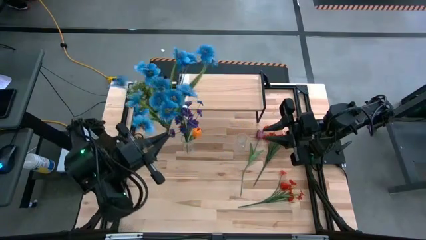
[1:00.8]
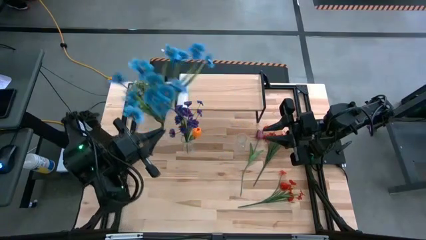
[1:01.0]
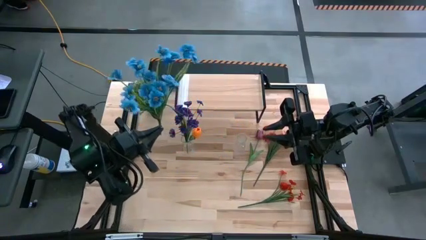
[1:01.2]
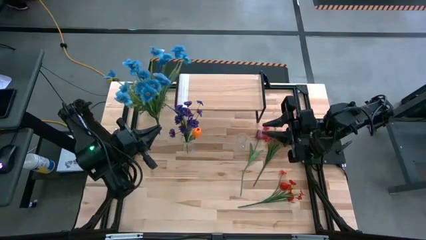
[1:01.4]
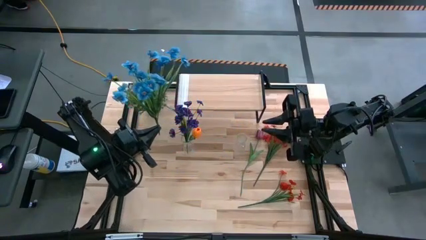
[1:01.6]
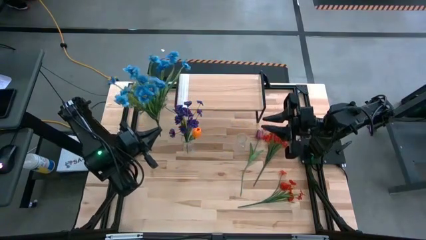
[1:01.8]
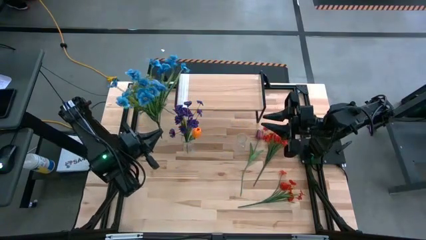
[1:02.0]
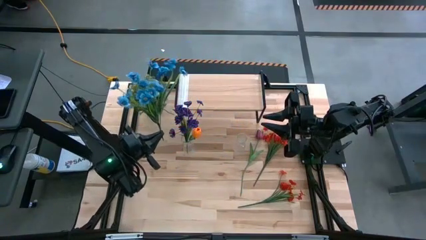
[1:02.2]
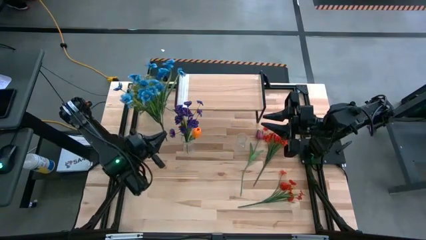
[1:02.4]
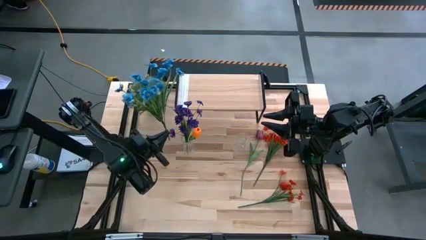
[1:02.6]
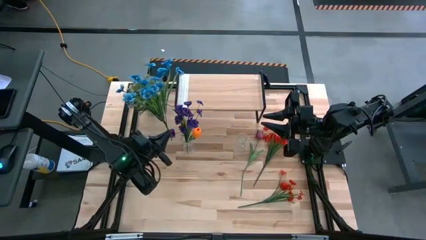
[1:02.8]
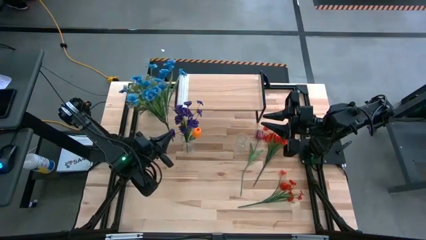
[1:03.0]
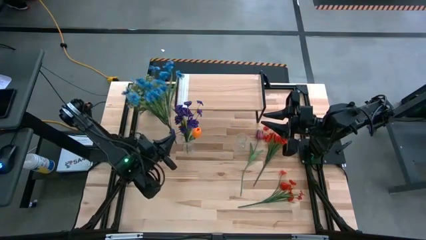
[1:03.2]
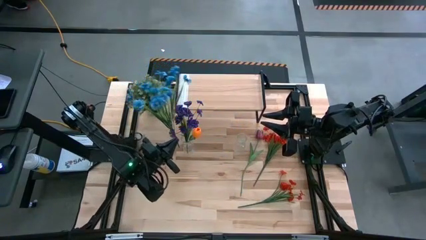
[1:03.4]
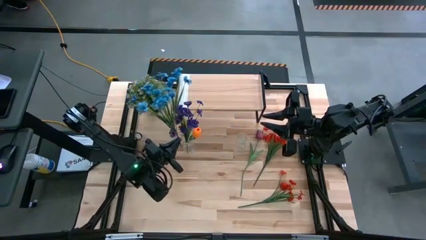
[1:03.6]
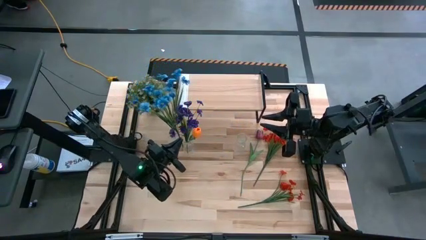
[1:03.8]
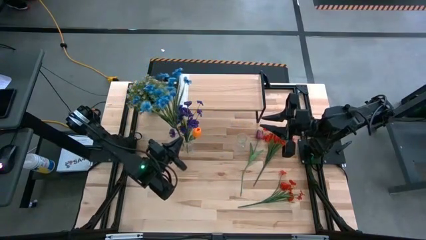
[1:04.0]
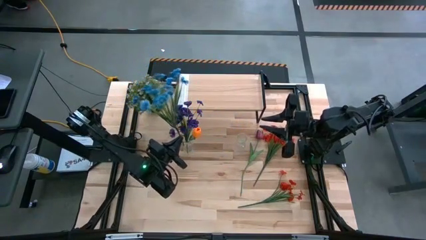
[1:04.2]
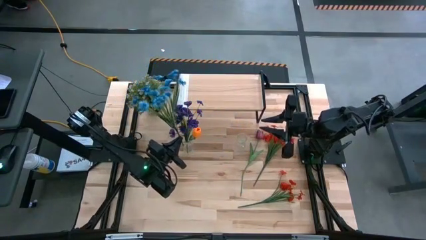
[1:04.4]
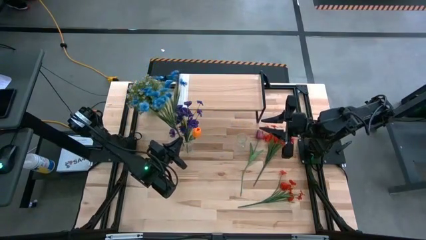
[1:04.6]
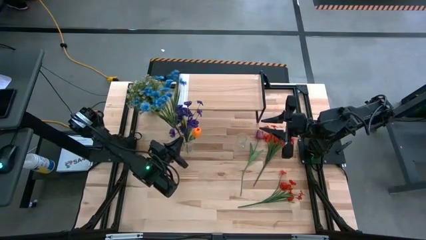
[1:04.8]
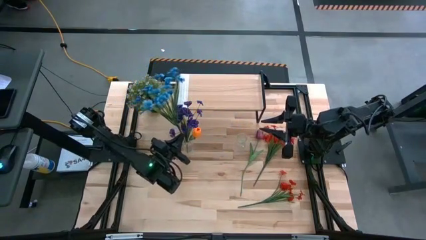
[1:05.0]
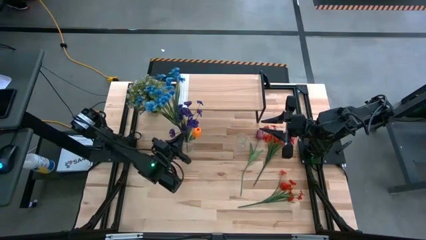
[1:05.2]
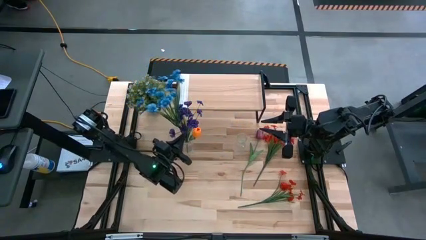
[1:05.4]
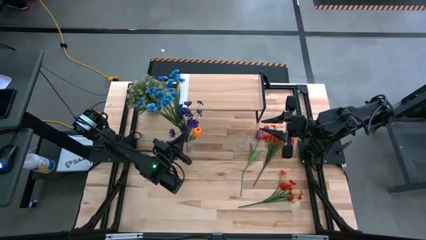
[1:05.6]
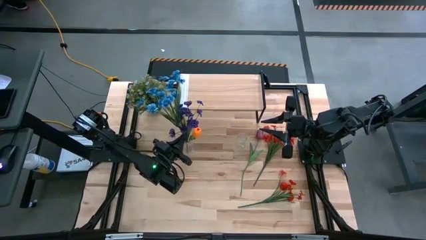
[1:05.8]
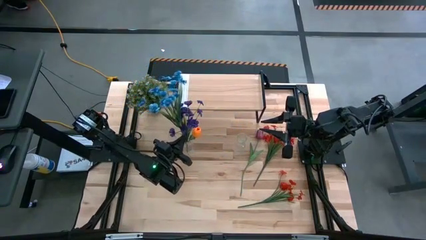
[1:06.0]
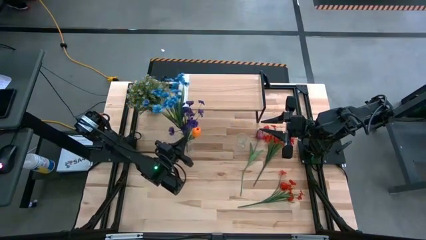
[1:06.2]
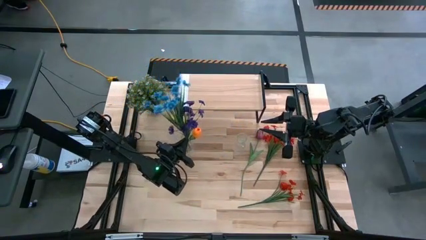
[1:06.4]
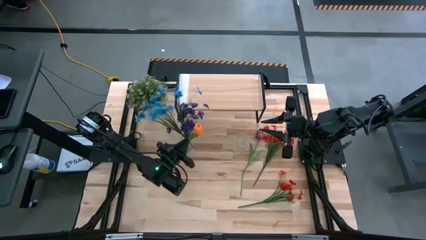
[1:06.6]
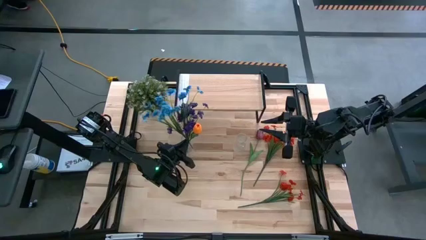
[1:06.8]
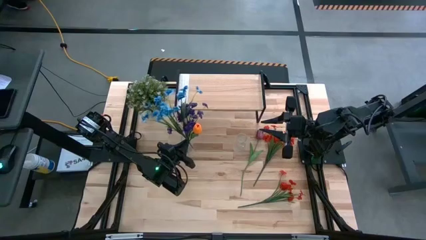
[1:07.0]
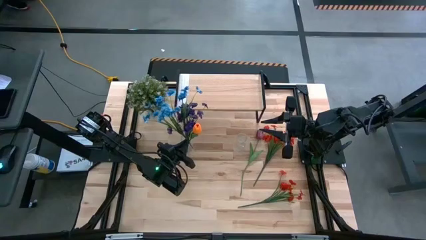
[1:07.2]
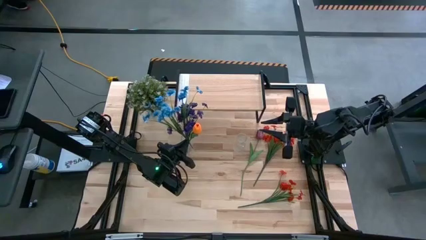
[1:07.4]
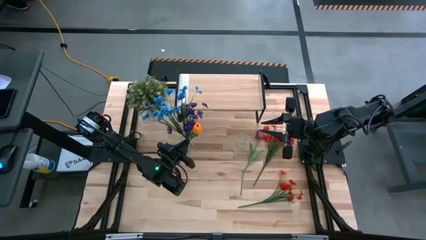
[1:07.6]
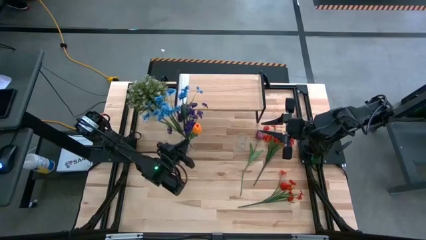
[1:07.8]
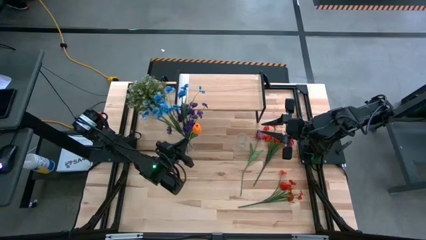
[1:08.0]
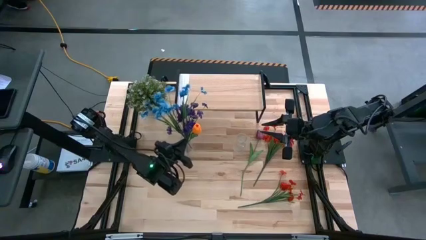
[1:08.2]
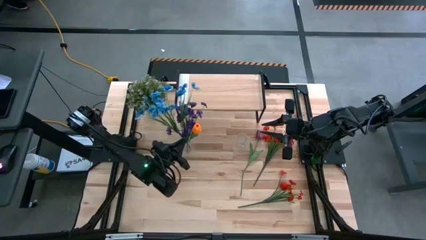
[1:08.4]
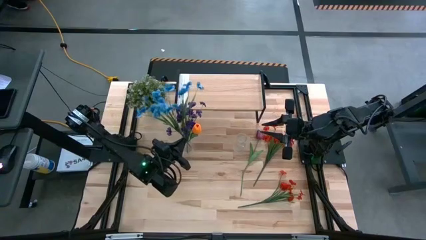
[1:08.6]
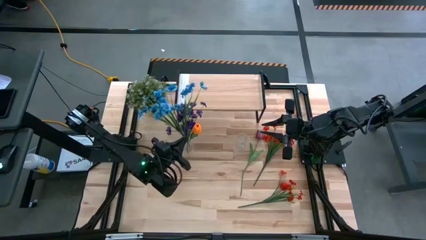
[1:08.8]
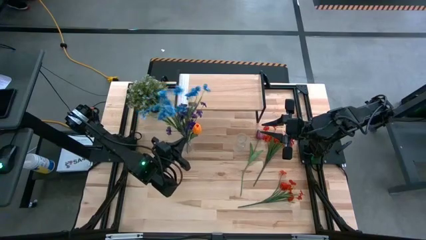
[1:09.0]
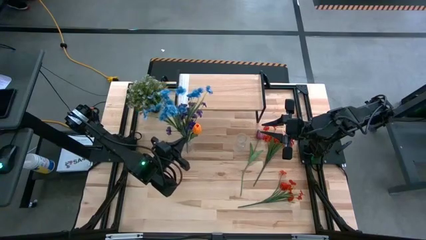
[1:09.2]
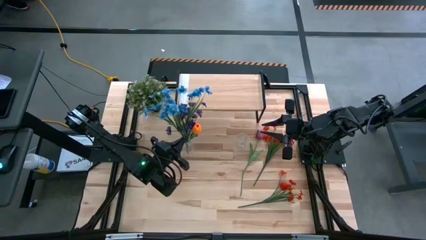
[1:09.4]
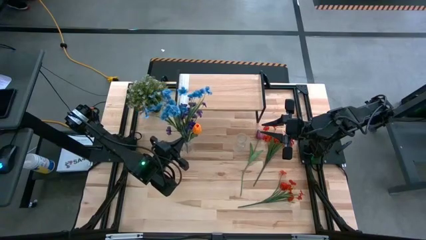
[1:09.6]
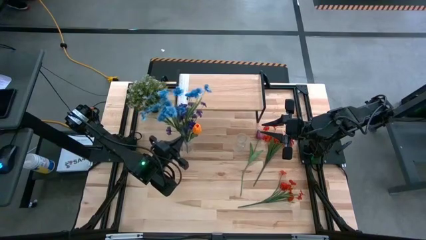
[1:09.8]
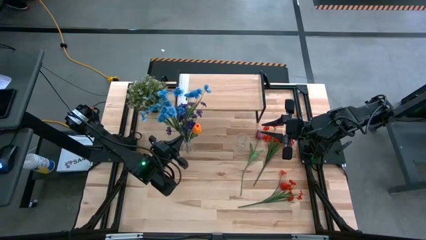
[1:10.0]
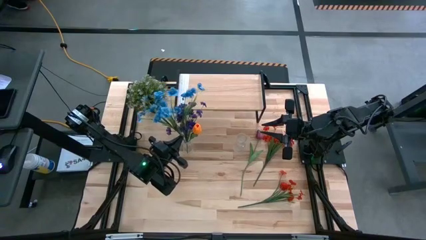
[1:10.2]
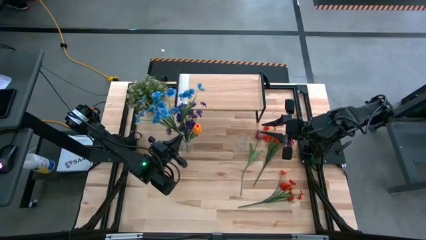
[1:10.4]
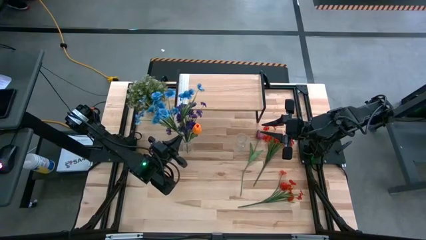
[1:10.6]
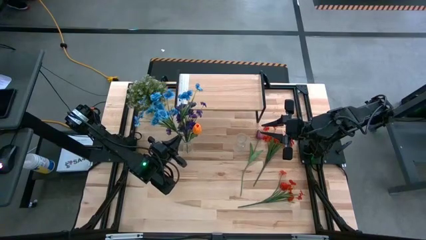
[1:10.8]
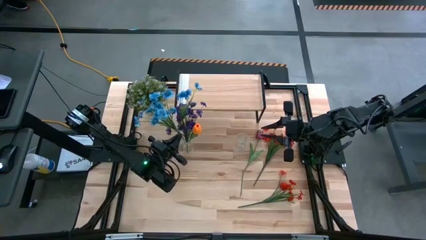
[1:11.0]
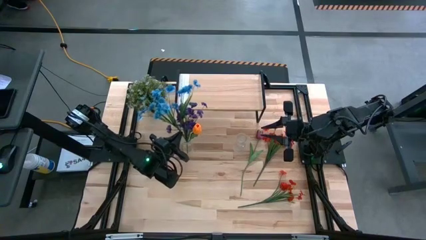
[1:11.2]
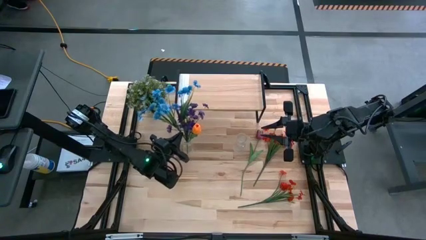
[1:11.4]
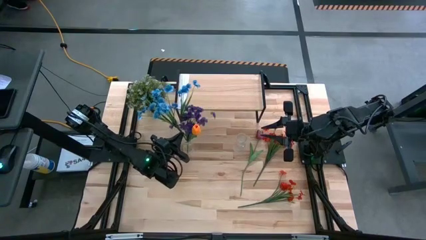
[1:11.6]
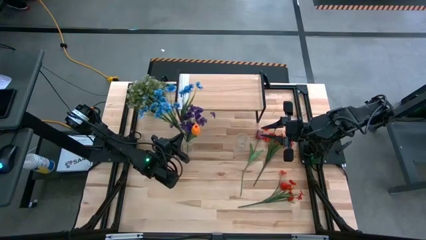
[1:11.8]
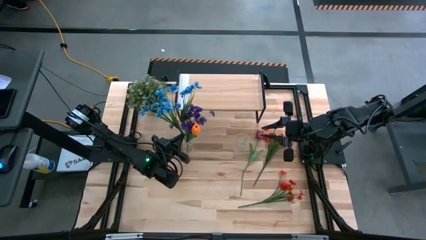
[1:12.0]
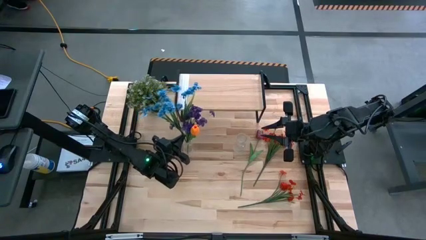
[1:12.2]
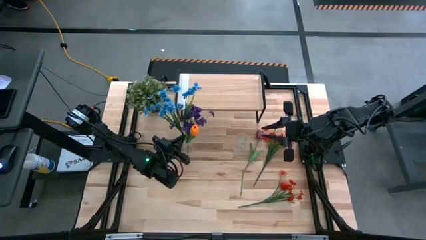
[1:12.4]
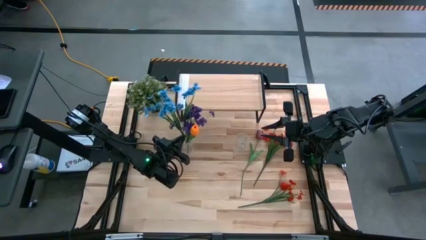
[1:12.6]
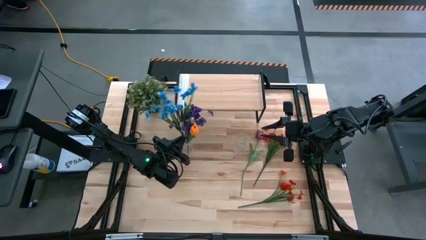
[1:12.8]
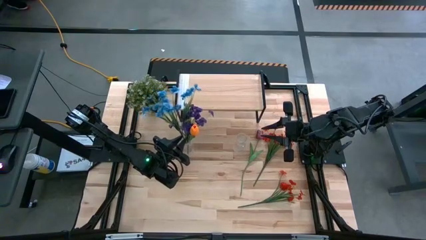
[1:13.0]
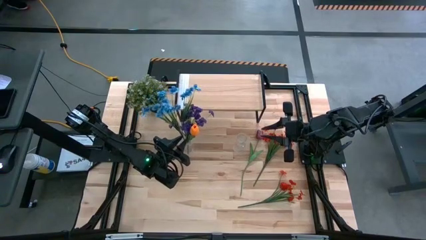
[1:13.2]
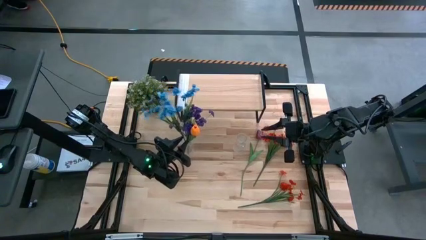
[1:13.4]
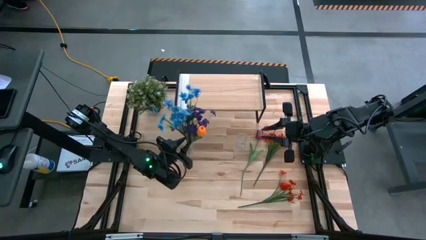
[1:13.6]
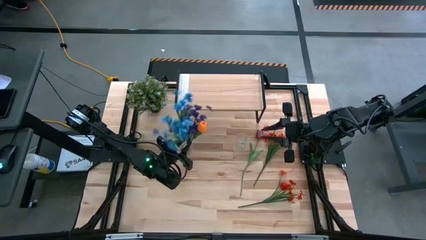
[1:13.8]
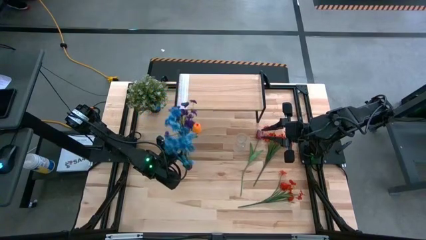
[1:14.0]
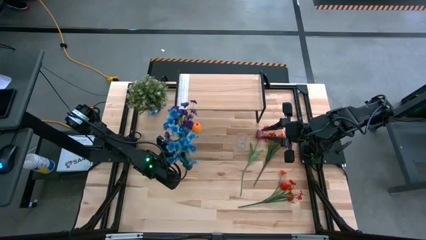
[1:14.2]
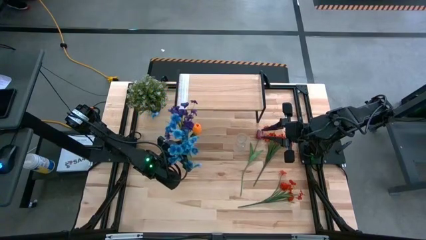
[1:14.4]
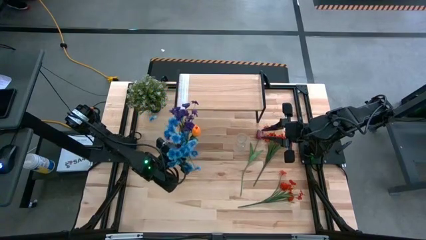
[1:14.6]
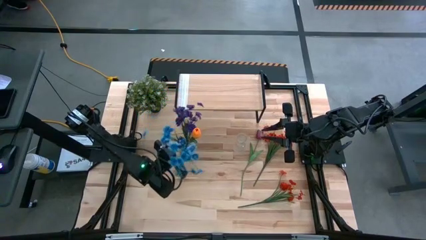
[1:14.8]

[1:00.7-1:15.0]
Task: Pick and place flowers into a vace then onto a shelf
Put the blue flowers into the left transparent vase
